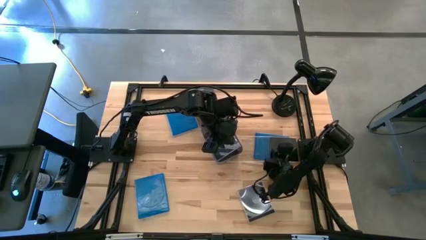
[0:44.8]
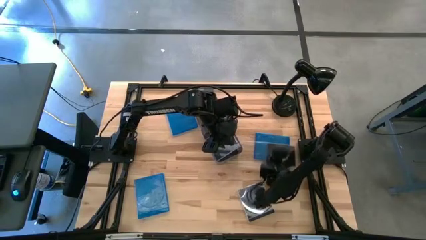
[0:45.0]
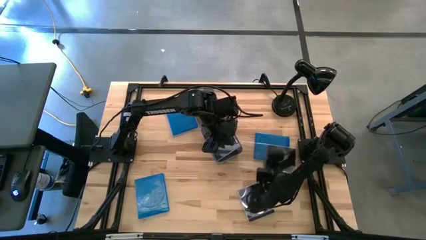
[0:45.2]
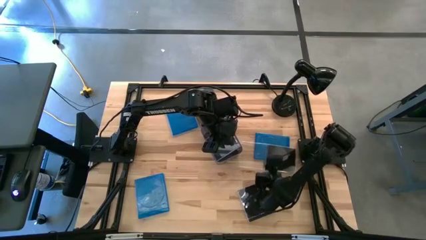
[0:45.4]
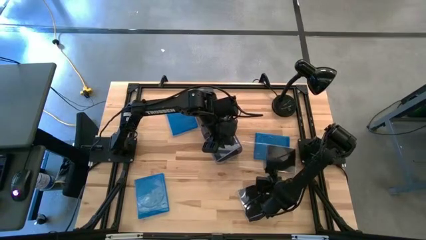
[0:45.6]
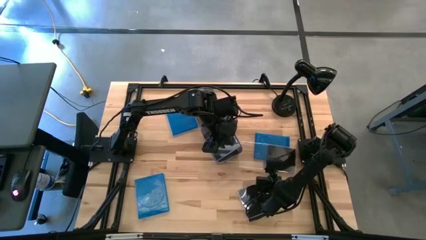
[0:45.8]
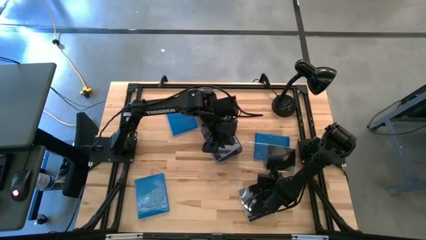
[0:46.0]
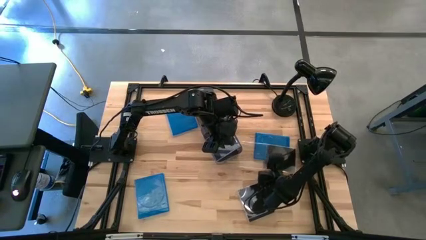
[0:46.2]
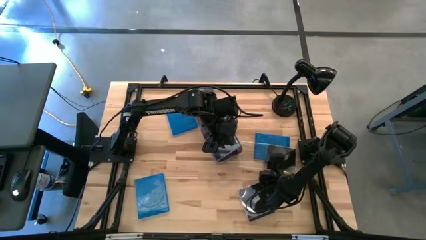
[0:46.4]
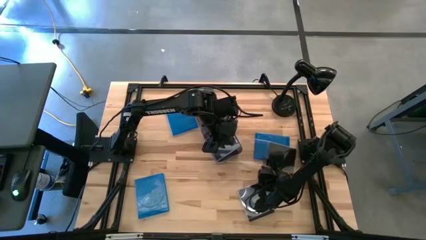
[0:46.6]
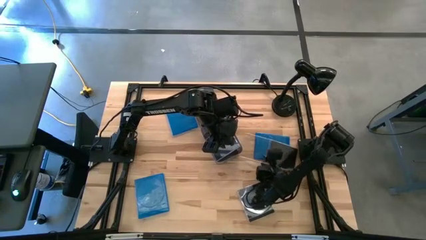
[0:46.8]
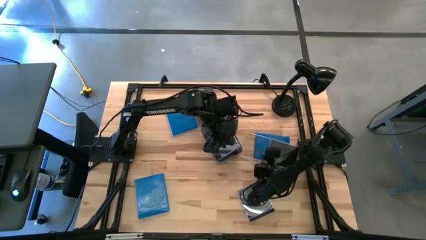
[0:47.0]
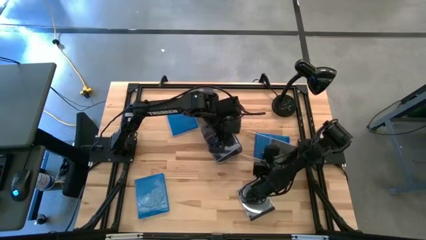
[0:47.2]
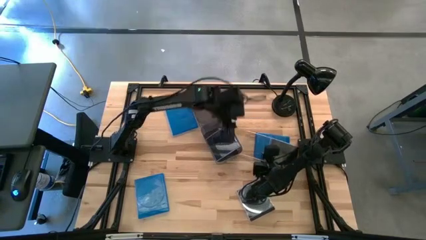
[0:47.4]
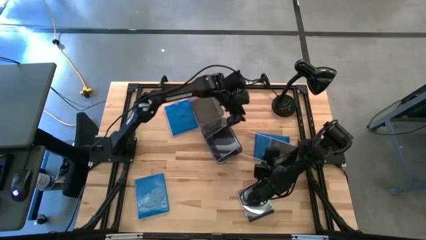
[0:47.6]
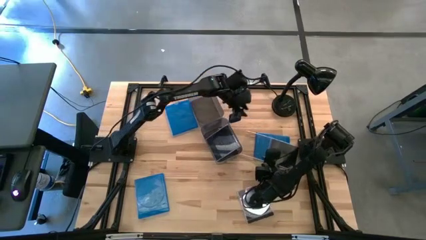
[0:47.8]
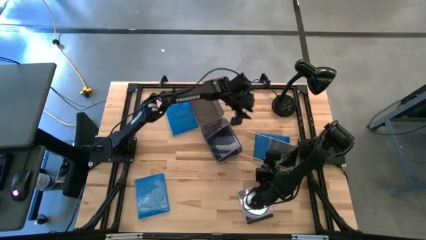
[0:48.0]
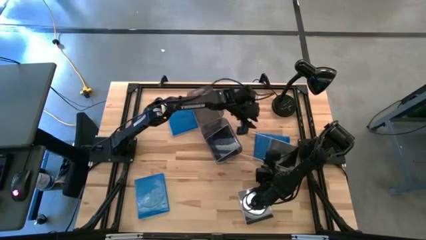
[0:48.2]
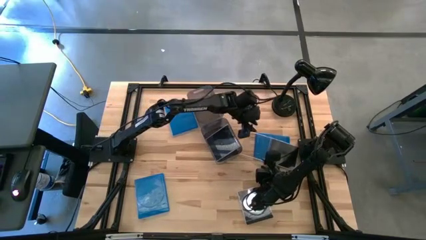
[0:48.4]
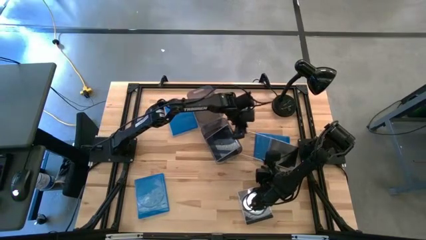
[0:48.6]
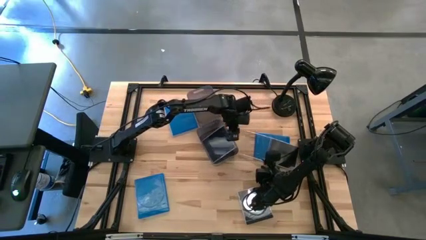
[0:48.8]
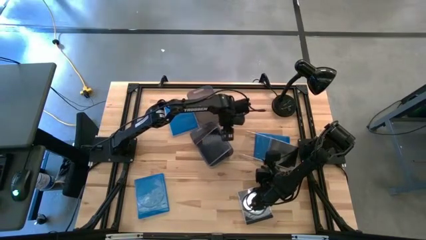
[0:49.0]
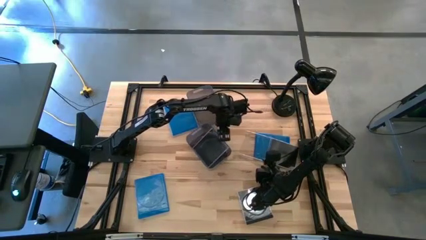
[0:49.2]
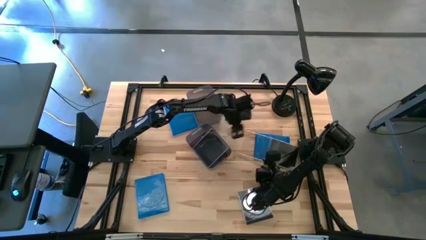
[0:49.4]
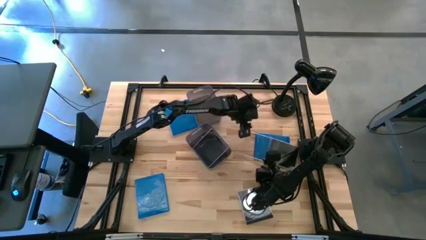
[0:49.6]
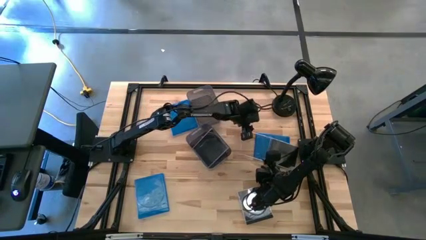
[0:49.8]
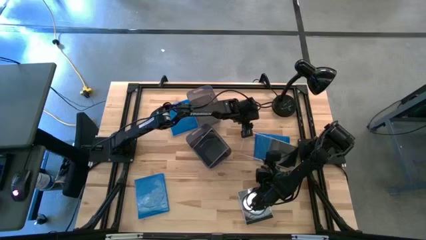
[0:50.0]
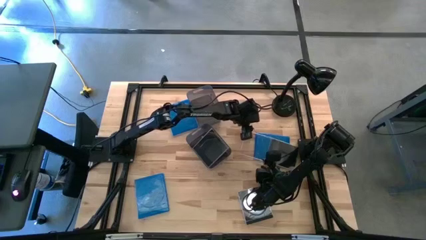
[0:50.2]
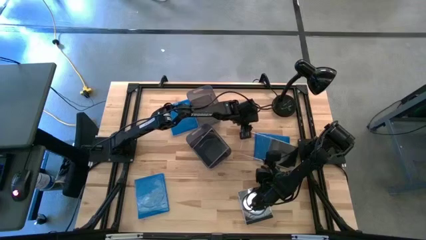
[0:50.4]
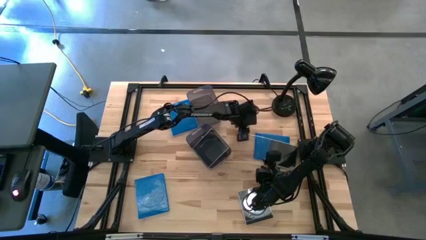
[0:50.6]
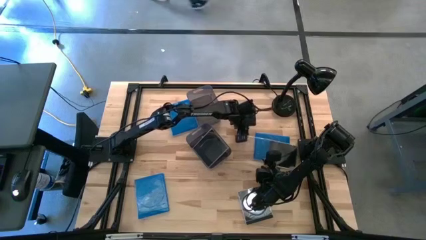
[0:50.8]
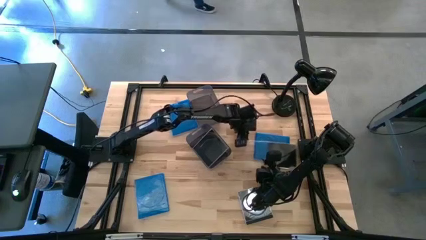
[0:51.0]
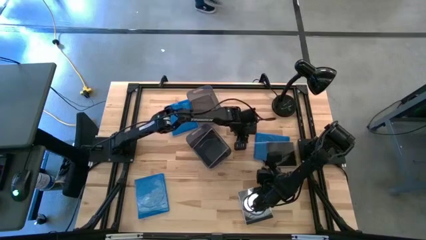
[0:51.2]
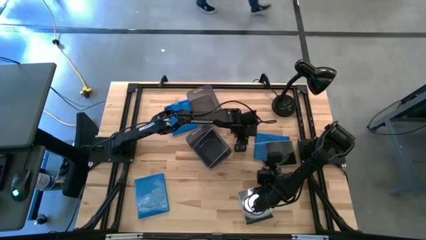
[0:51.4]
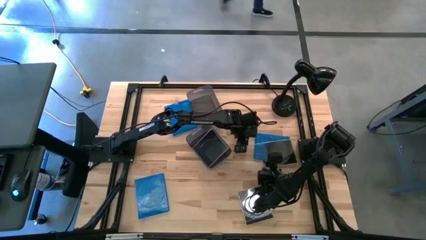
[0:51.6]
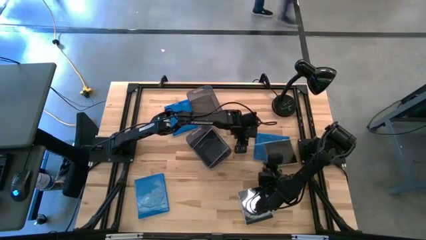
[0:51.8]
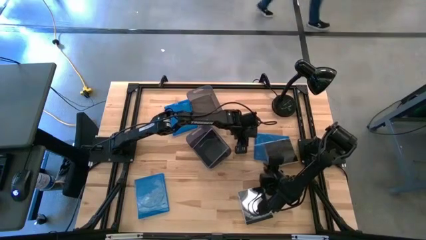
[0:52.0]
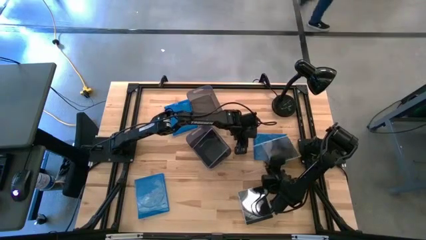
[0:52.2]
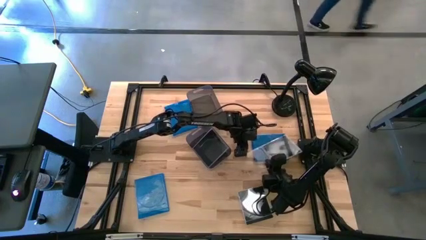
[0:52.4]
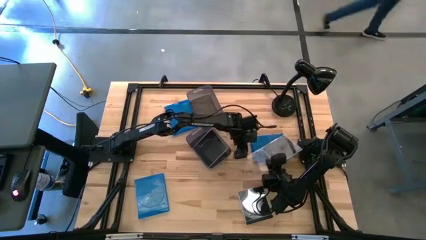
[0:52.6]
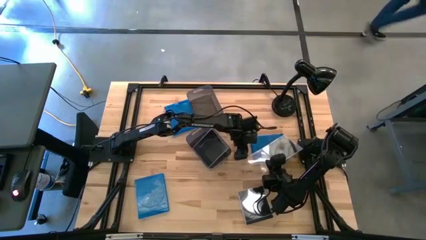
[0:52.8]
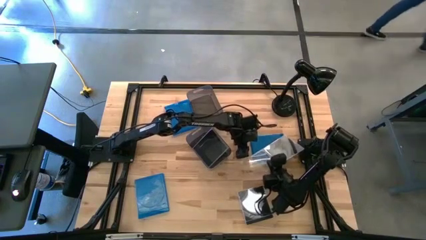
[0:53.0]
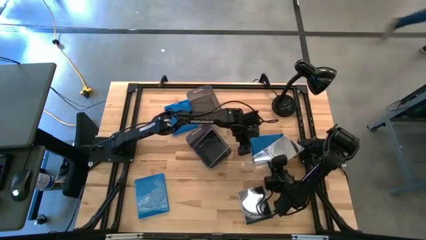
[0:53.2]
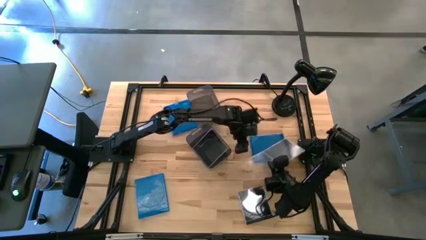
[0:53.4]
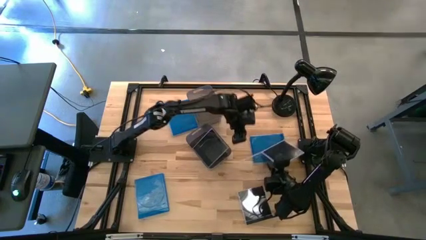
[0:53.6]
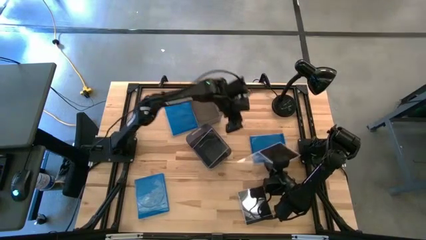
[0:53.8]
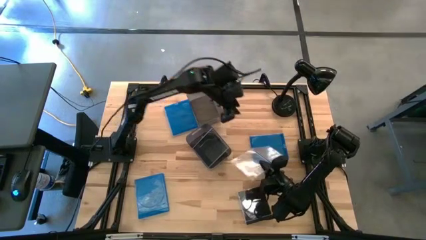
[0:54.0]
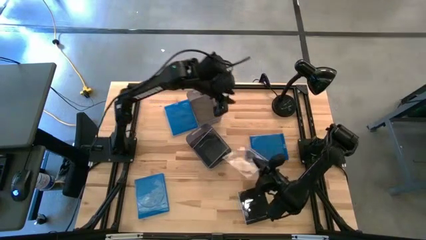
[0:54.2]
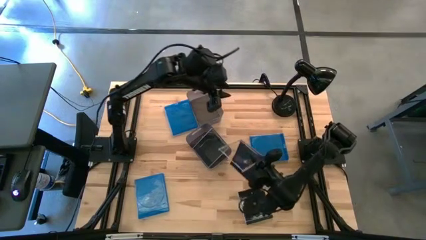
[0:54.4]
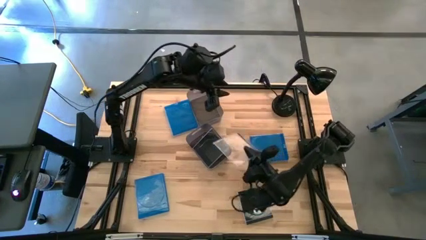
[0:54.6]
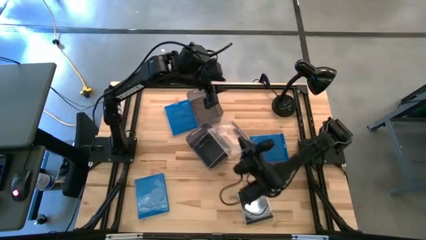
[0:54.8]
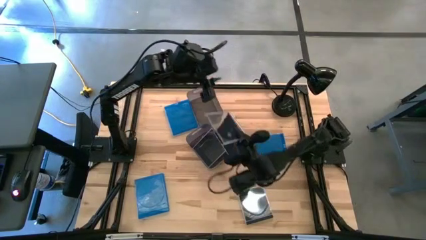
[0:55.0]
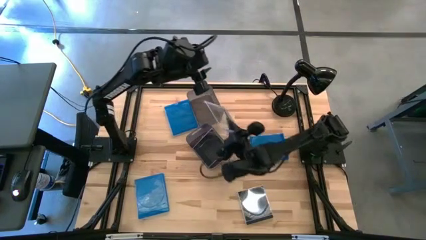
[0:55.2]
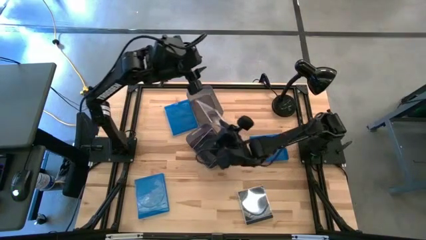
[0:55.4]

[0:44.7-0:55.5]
Task: Pick & place jewel cases by type
Put the left black CD case into the bottom black bin

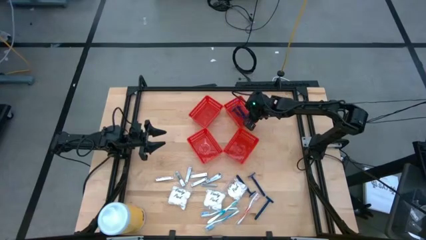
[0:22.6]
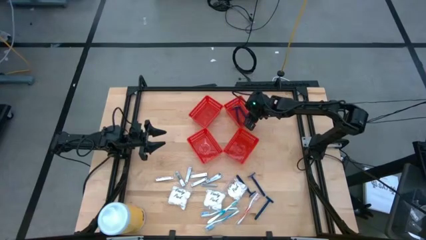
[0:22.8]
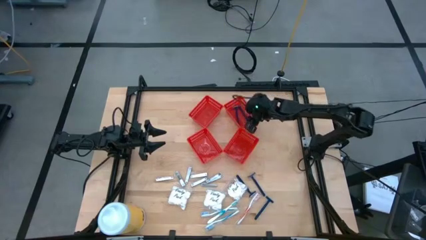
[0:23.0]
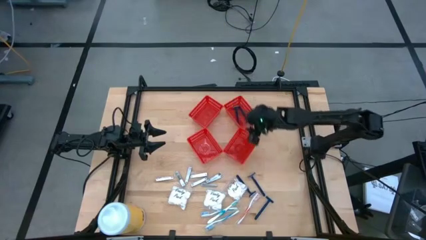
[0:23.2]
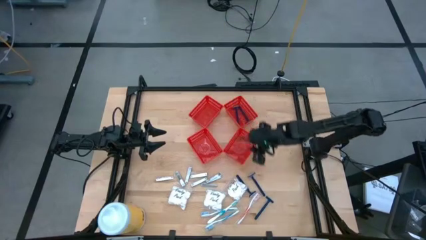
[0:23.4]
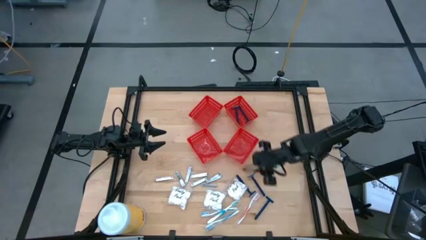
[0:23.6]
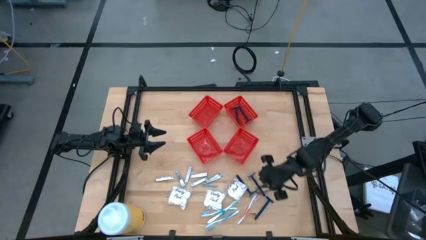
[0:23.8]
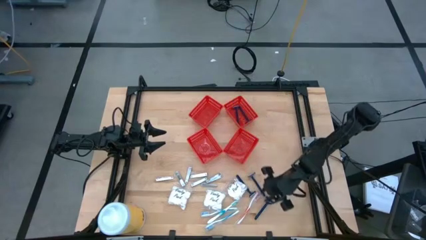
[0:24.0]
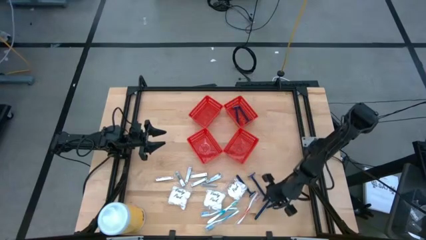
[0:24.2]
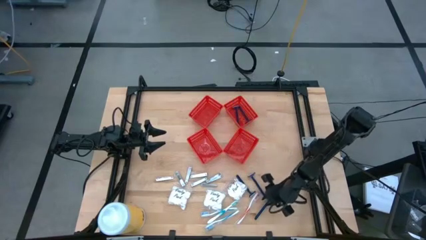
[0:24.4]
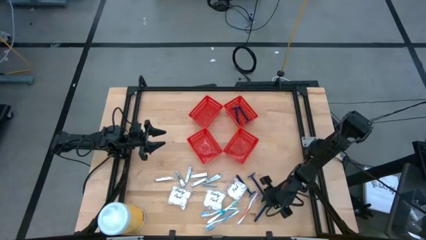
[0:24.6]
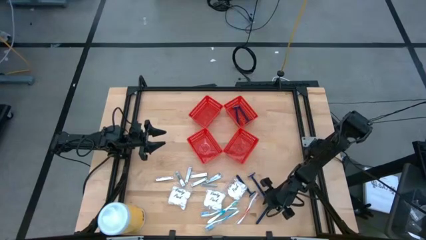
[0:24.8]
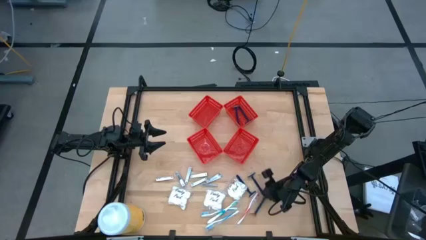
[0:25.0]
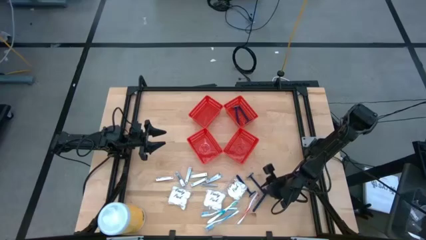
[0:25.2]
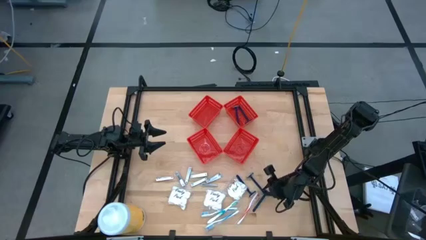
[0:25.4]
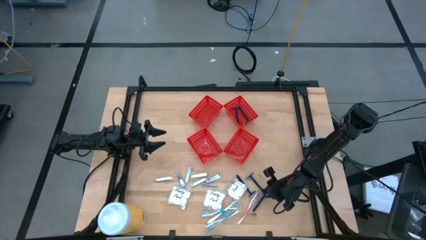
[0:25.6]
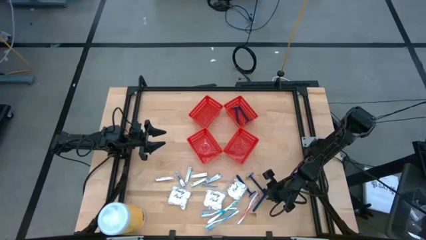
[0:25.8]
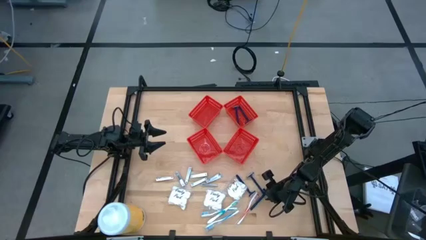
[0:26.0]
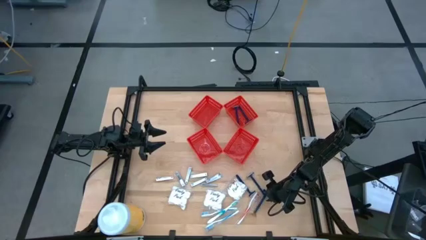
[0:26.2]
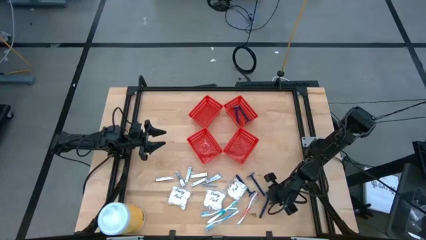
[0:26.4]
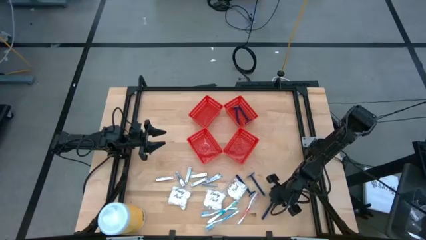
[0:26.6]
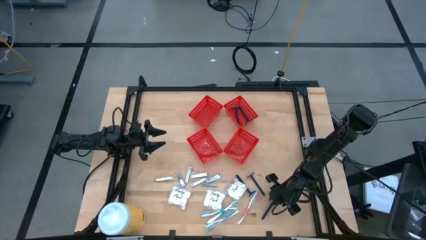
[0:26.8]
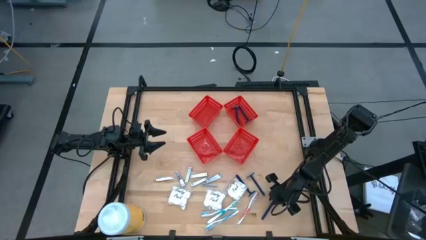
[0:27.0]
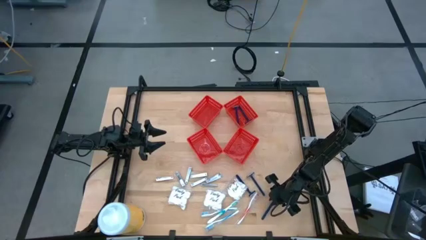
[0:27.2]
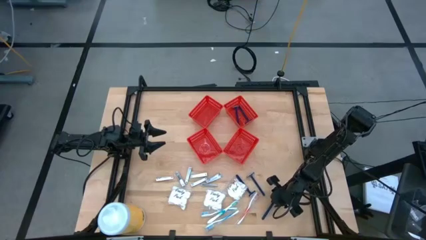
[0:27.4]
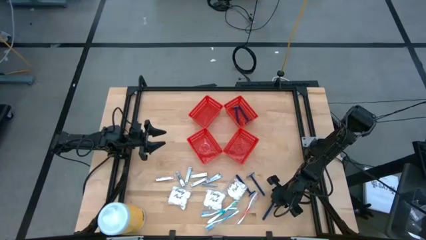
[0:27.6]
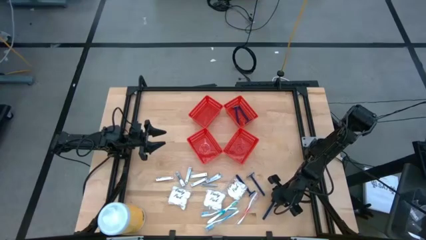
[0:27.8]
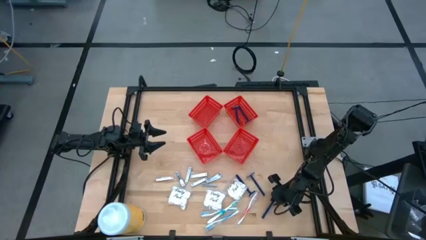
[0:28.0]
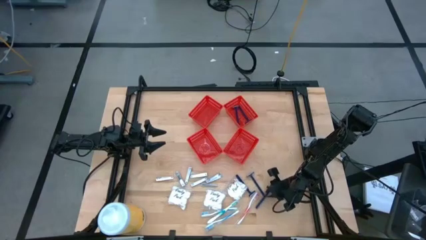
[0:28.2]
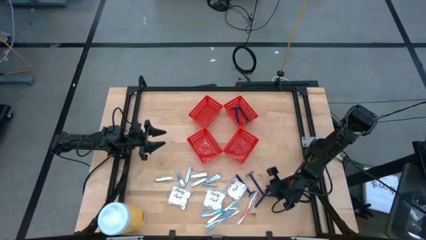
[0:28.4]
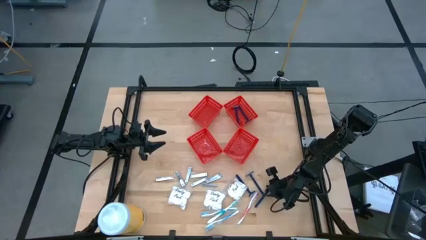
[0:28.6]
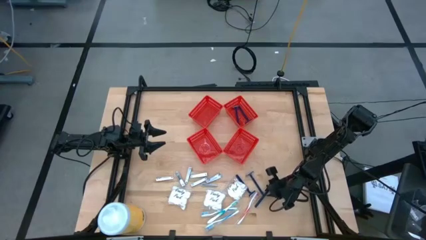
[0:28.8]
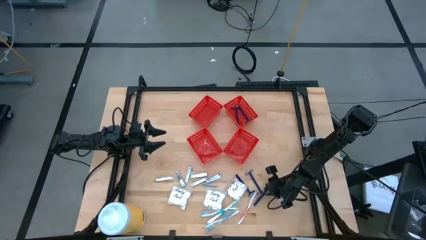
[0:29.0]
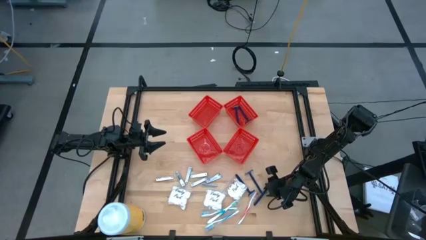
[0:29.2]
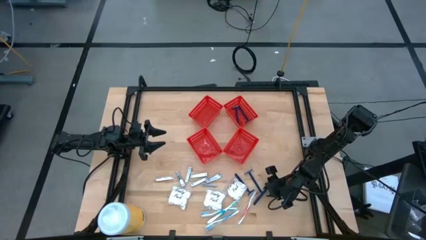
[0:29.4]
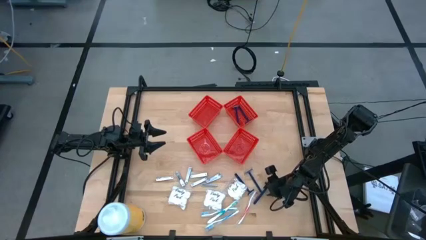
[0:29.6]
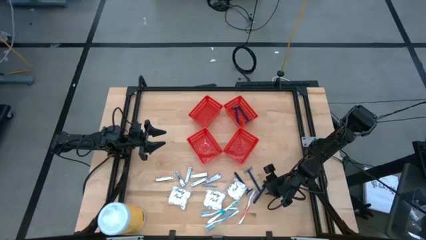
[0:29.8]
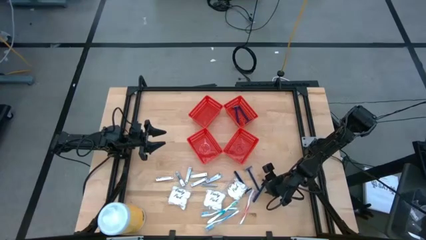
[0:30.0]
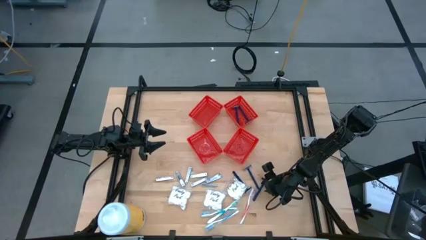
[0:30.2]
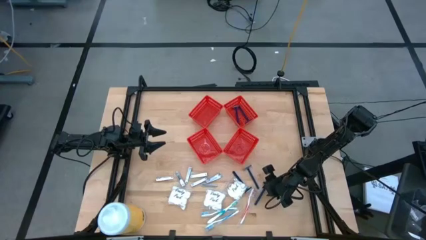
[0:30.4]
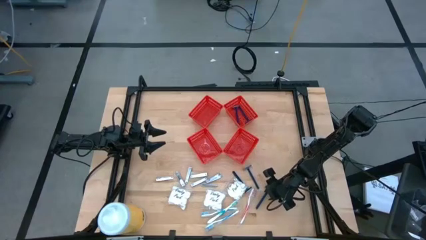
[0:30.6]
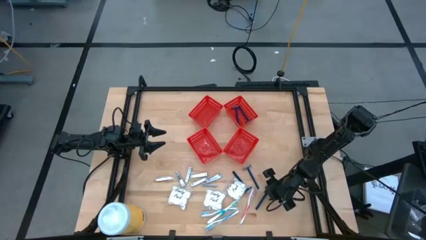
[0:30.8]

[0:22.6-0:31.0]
Task: Pick & Place Travel size toiletries
Put the blue razor into the top right red bin
